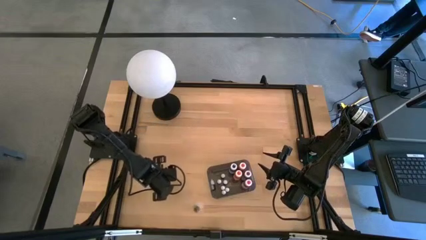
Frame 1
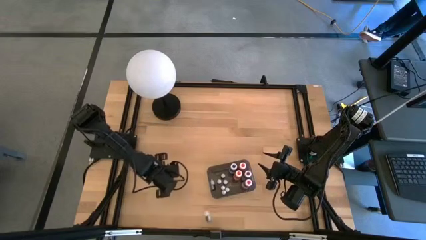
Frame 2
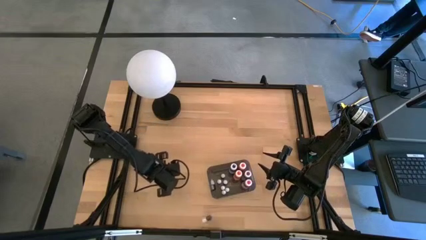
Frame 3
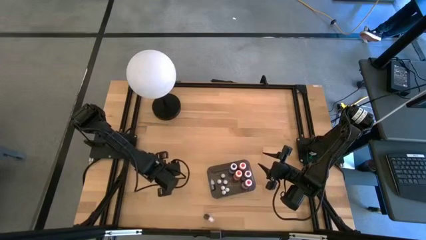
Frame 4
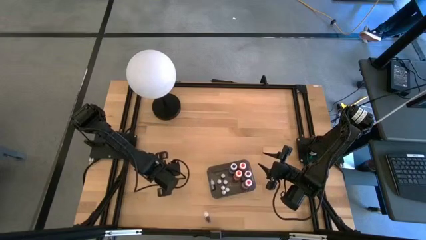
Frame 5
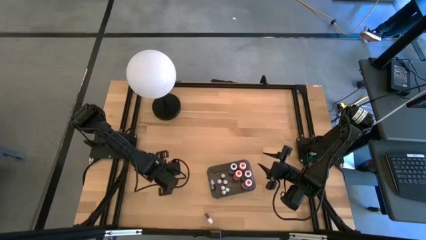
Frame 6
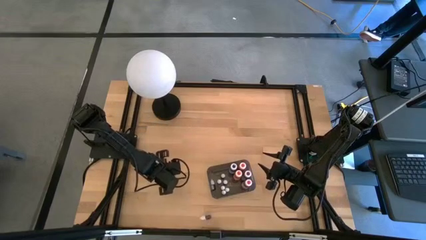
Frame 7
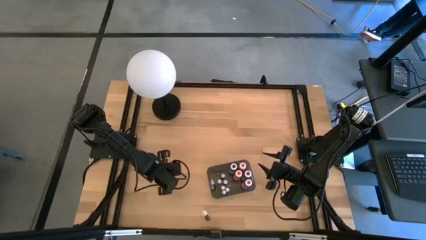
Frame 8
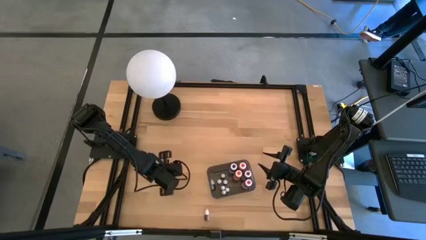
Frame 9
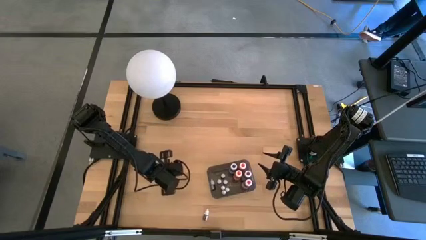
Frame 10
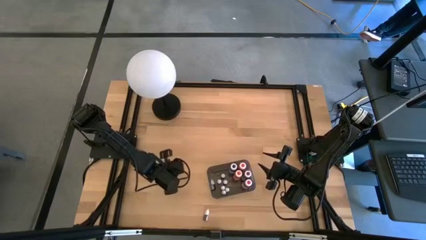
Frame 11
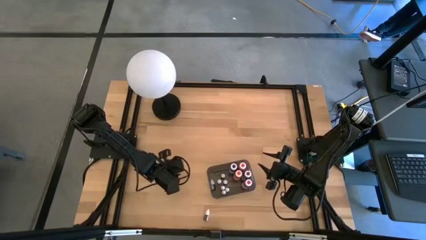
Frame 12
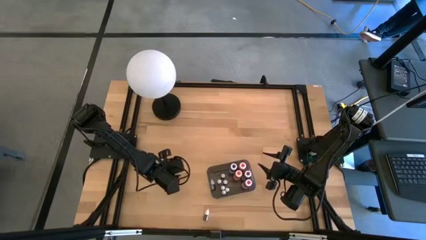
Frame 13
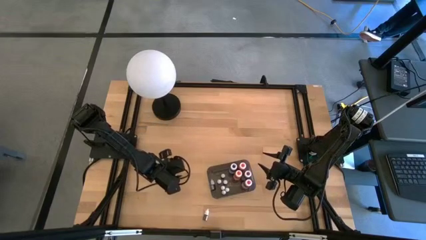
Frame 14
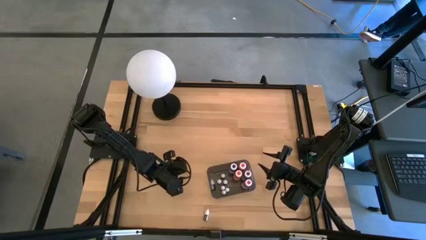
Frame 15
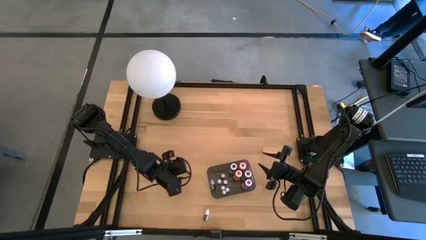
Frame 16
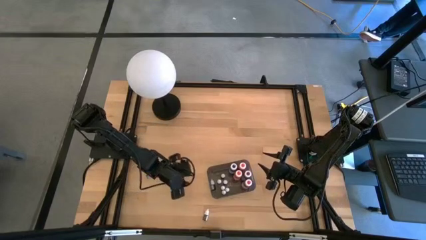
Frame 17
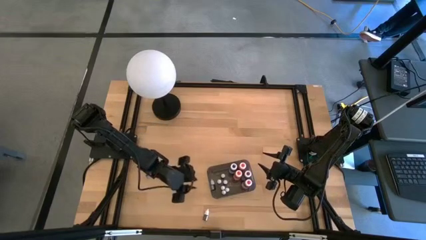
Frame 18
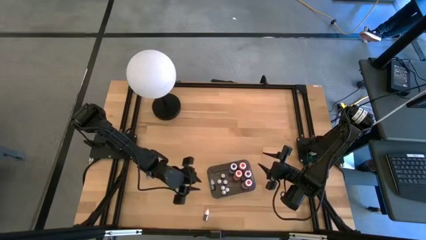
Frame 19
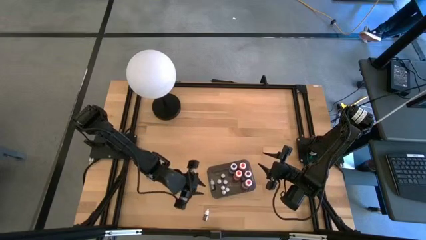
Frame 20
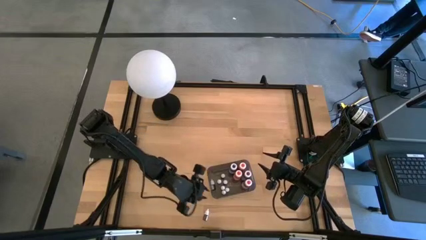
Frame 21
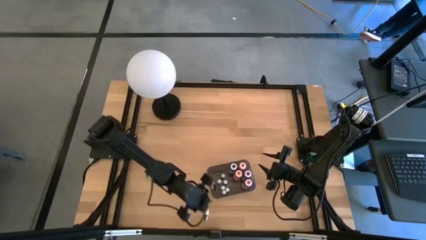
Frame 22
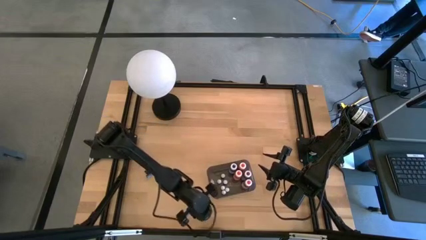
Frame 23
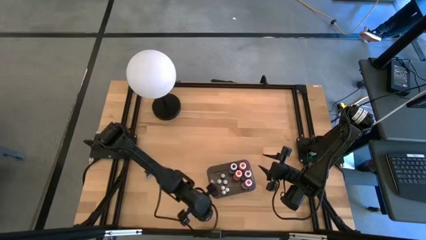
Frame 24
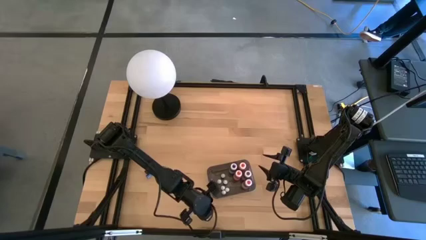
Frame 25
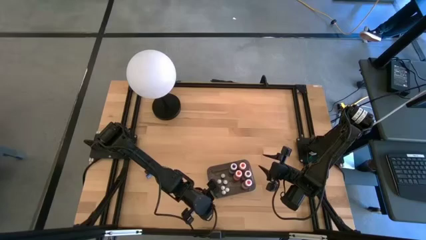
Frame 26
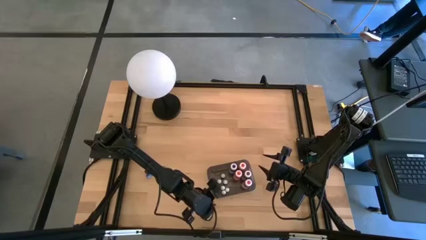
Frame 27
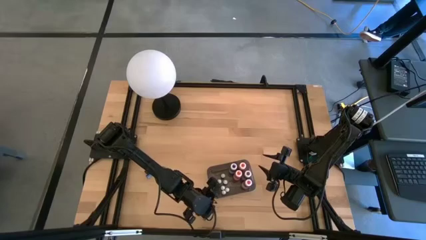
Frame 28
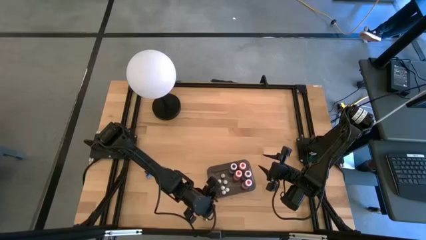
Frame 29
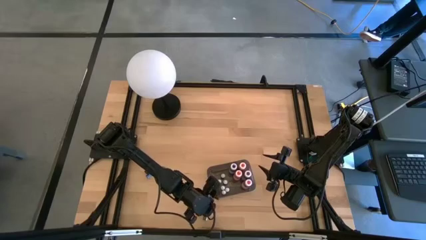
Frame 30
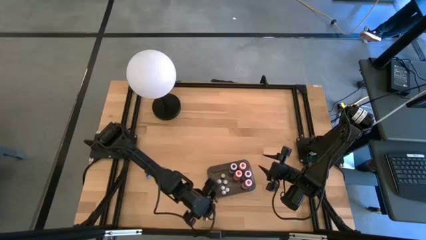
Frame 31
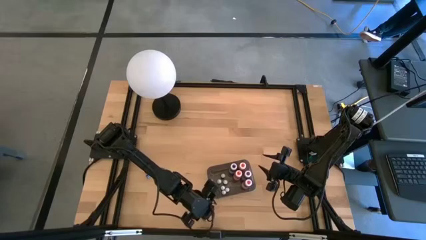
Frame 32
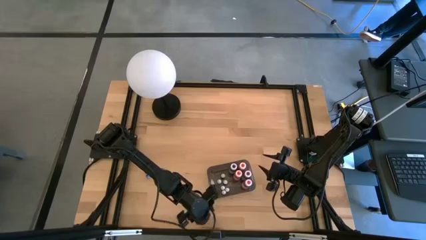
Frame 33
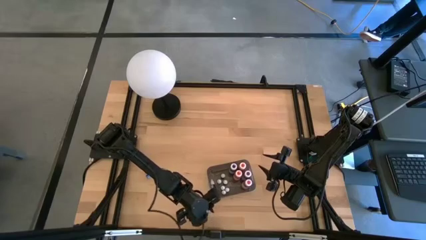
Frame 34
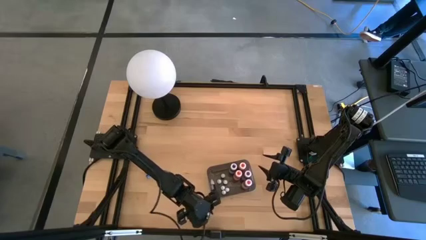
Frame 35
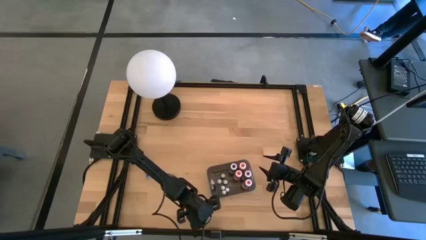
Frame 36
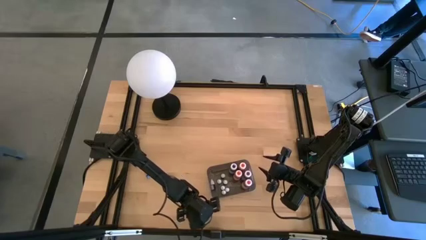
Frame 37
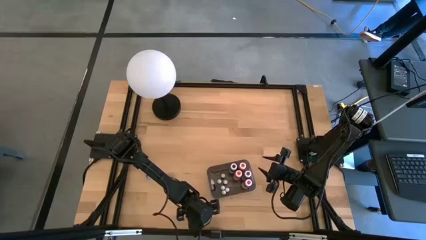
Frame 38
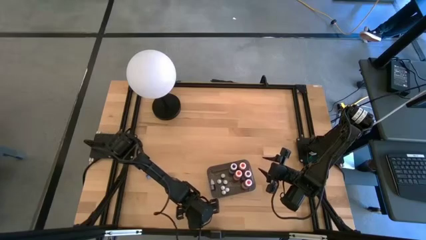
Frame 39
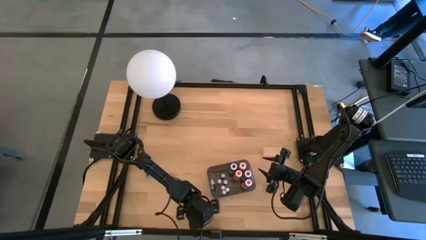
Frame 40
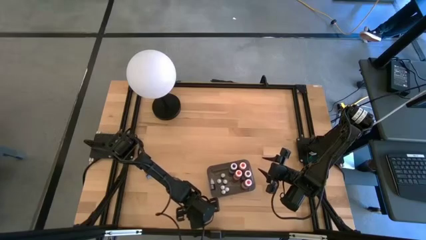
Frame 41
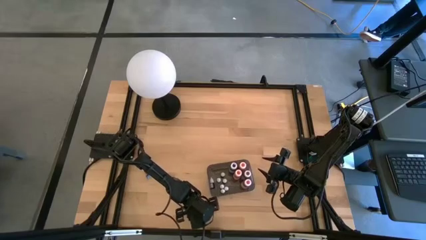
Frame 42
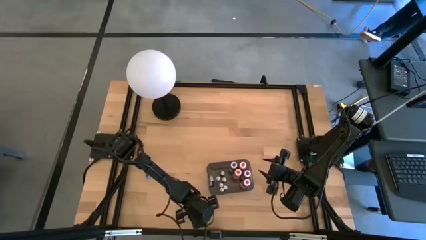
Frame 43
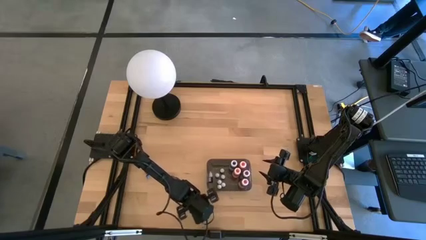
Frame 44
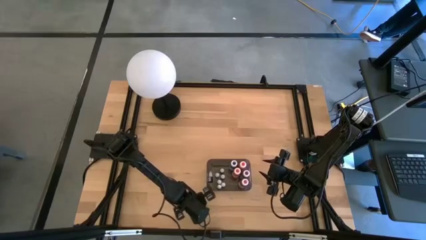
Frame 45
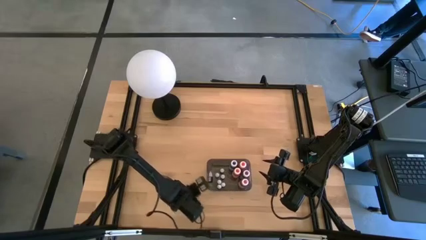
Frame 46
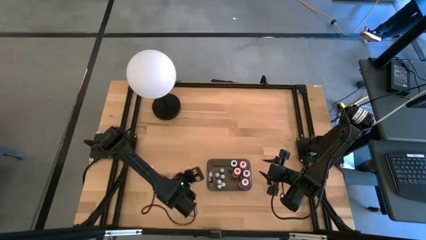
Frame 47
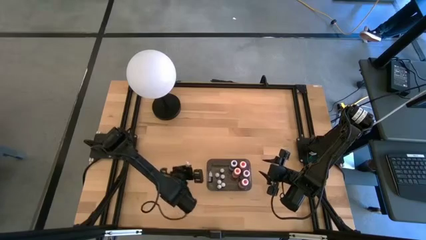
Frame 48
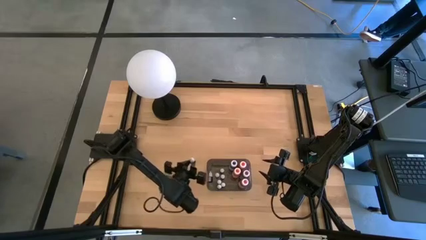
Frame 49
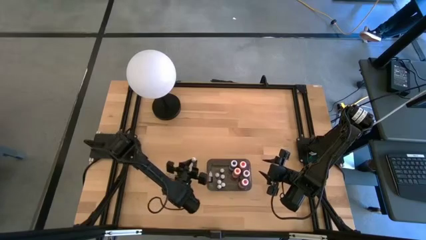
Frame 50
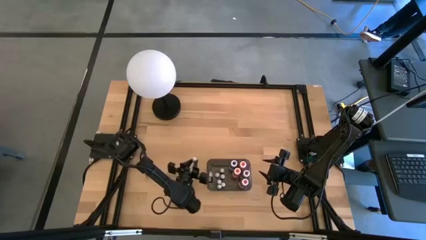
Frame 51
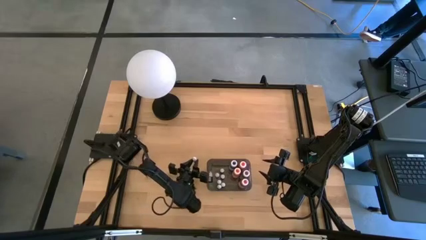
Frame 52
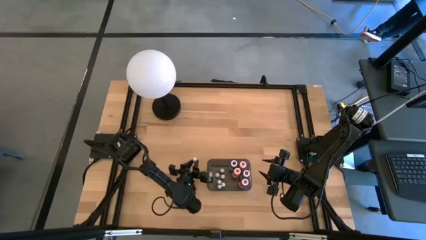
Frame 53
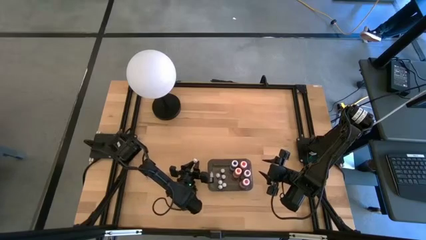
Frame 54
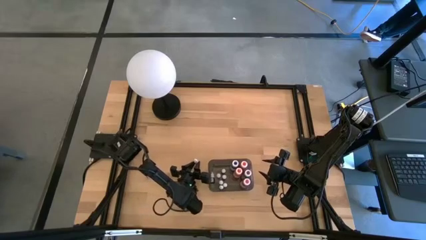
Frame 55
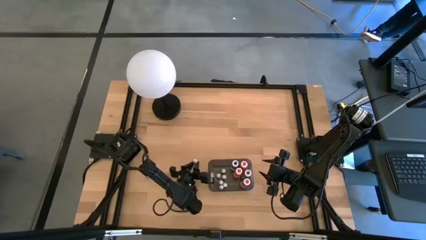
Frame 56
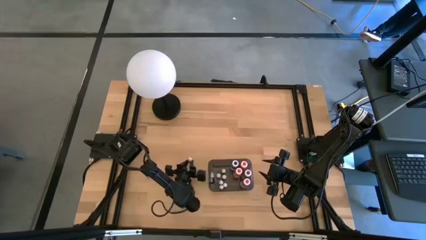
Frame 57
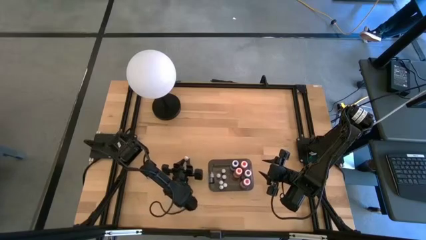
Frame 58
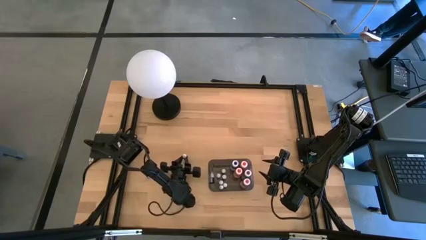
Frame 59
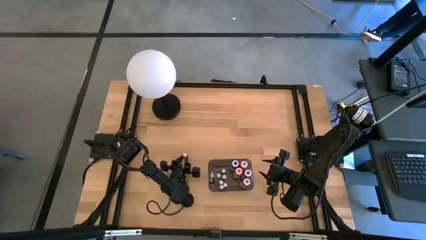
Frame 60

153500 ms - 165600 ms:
Task: Pick & Place food coloring
Put the small food coloring bottle into the black bin

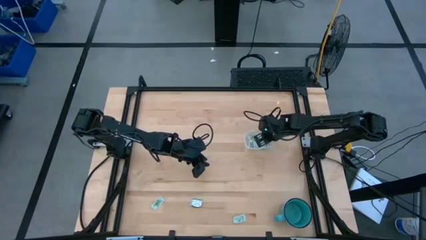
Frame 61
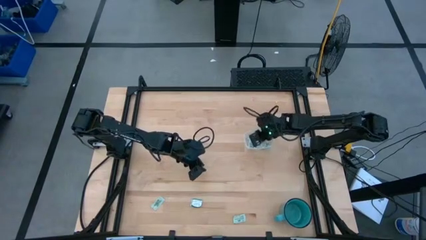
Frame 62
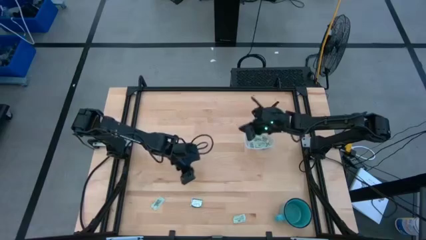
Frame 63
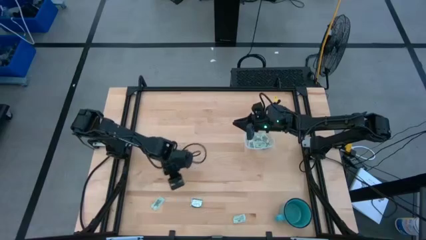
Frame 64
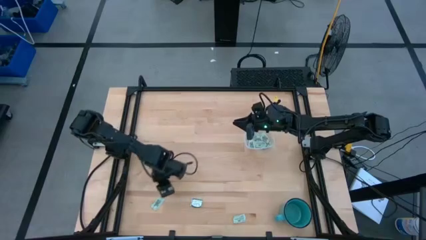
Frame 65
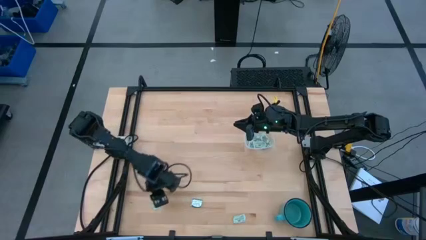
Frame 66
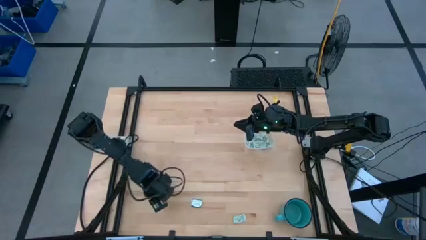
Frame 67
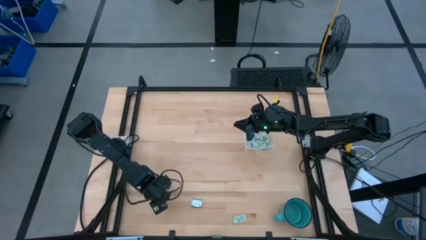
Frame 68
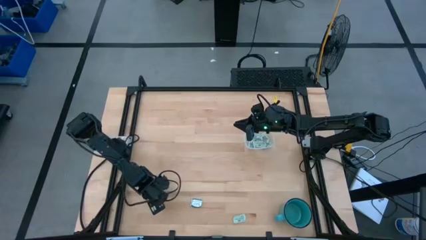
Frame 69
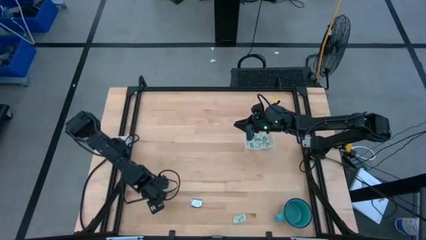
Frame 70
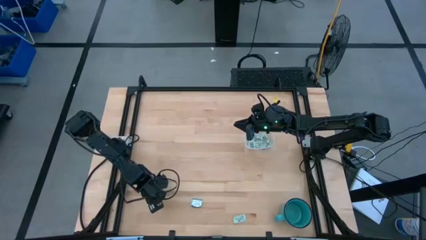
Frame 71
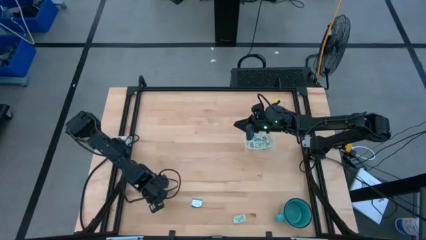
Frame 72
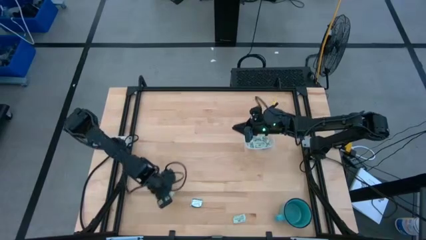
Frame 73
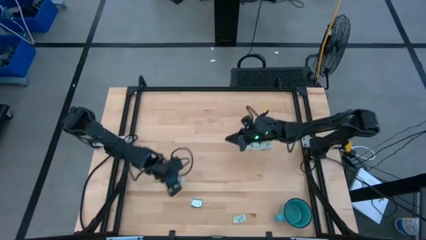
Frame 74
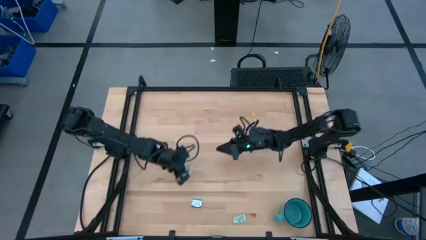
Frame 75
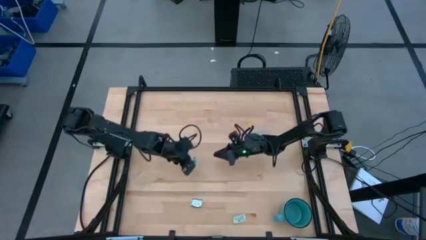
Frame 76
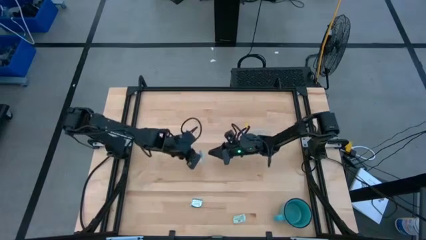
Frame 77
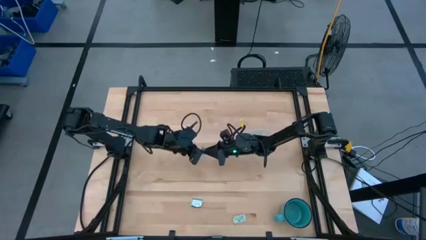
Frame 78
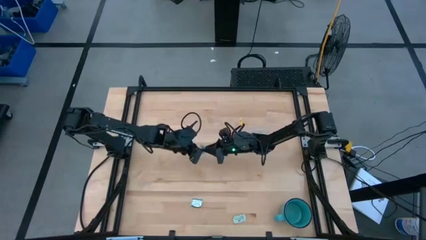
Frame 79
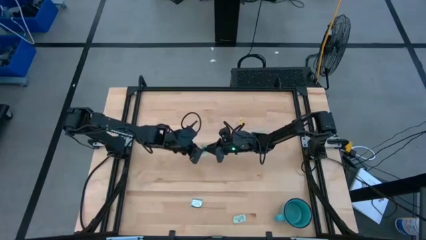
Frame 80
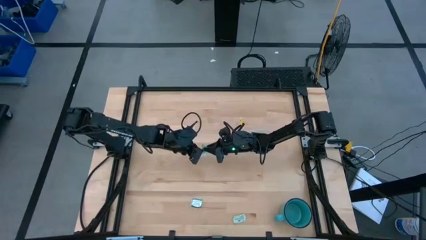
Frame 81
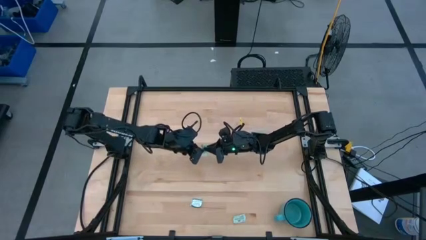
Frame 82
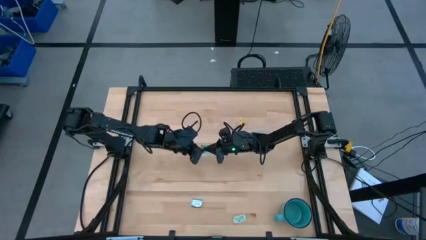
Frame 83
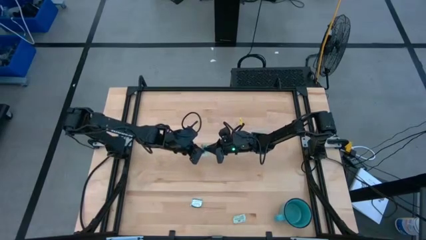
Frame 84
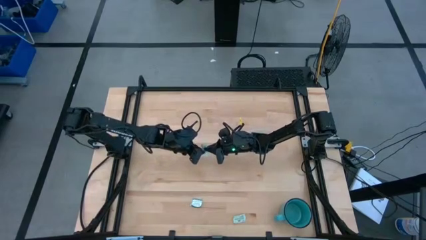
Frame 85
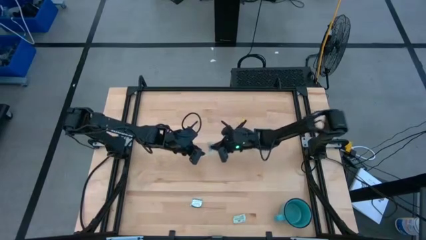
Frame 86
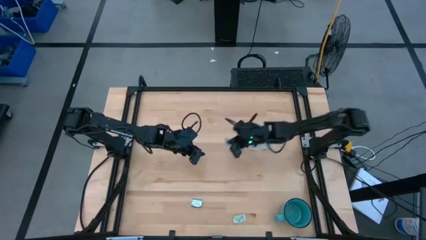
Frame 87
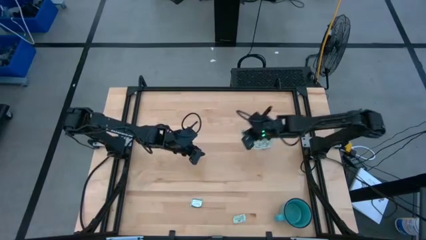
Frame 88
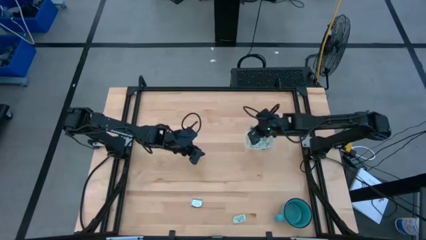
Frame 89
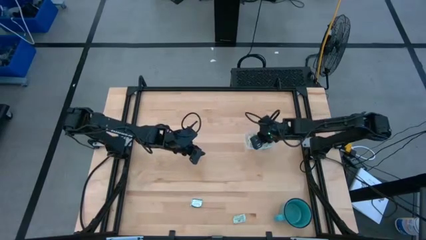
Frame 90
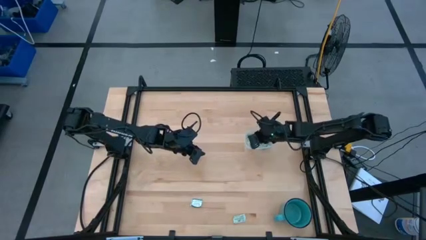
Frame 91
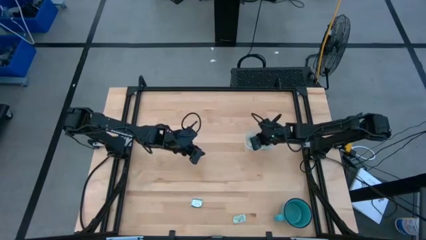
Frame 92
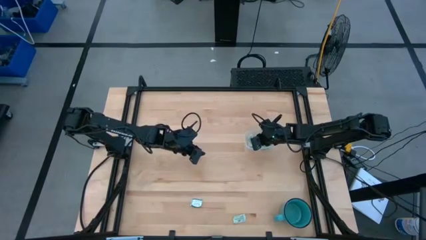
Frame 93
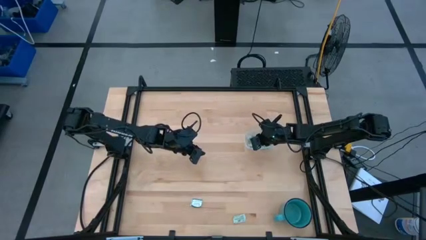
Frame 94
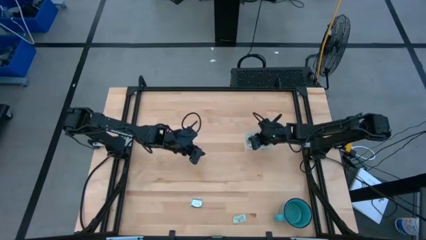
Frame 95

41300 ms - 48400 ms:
Task: Pick and place Stevia / Truvia into bins
Put the green stevia packet into the transparent bin
